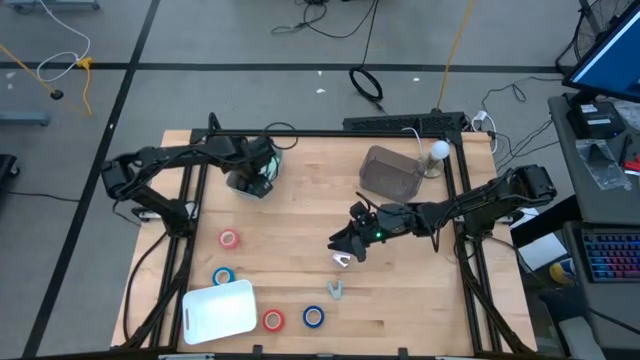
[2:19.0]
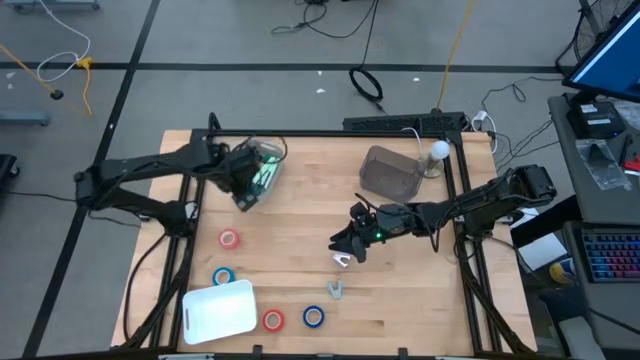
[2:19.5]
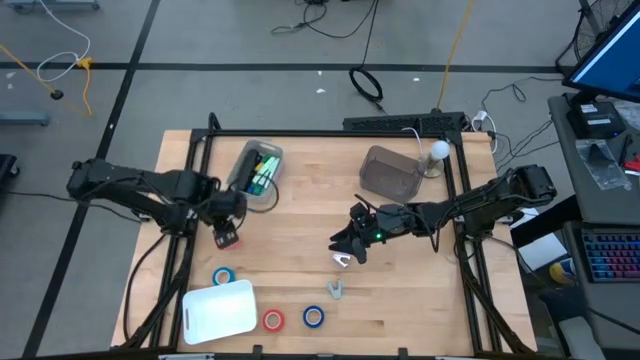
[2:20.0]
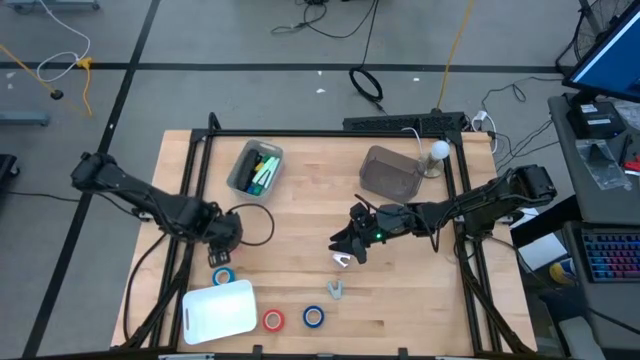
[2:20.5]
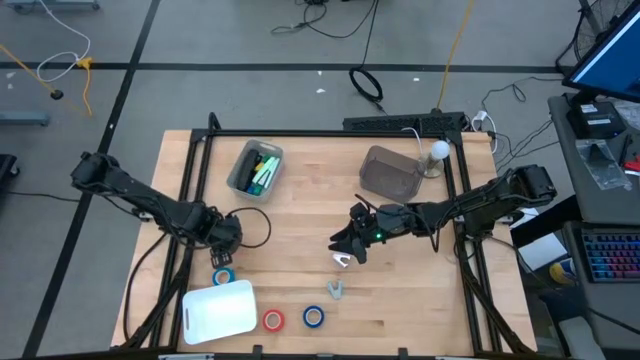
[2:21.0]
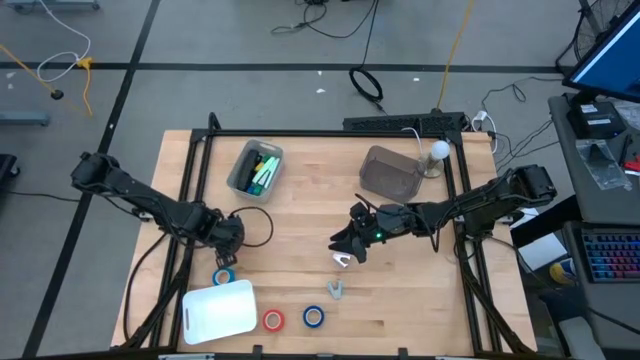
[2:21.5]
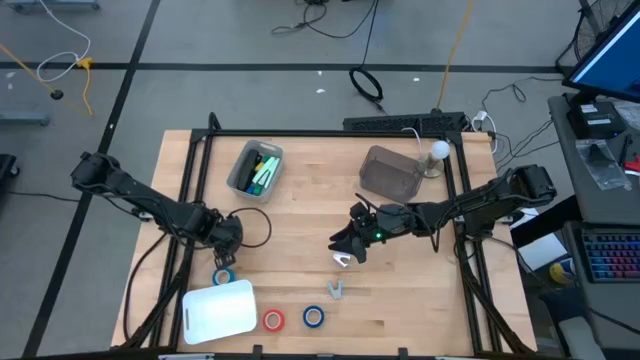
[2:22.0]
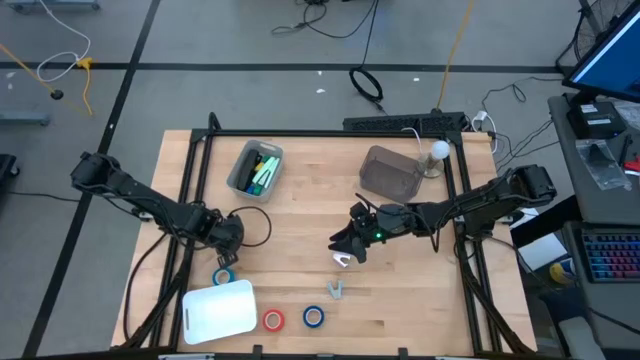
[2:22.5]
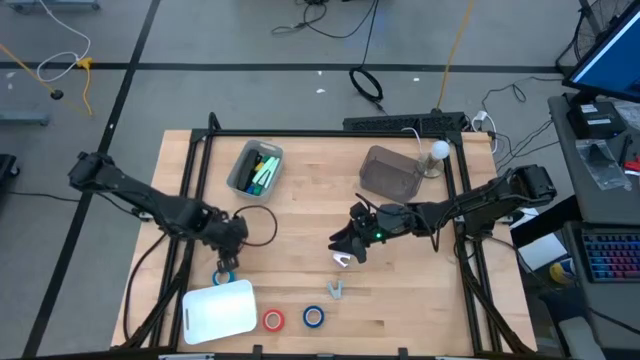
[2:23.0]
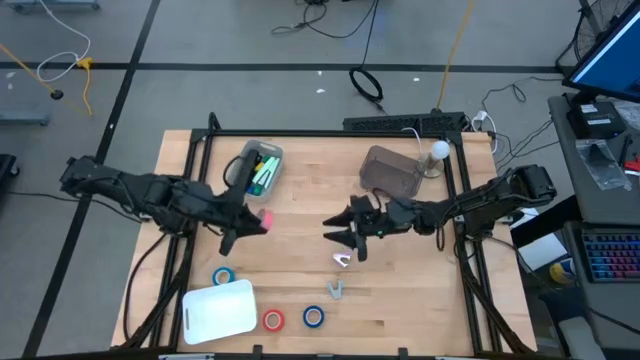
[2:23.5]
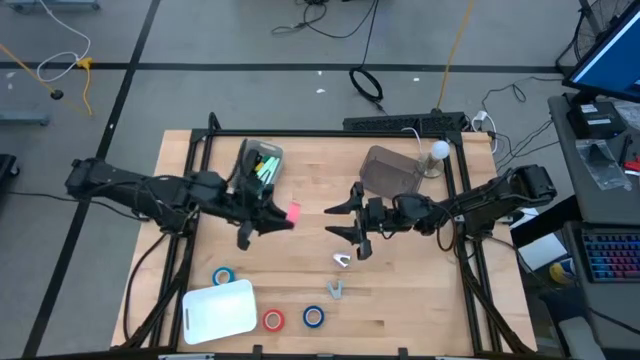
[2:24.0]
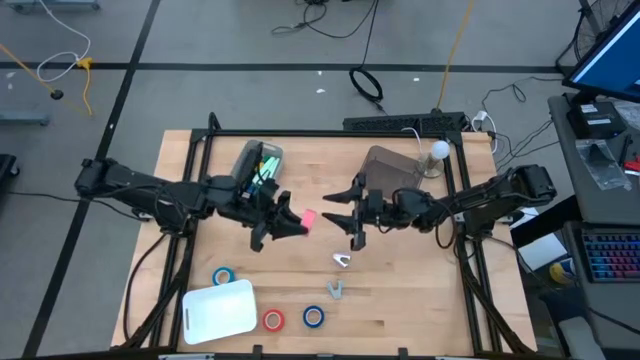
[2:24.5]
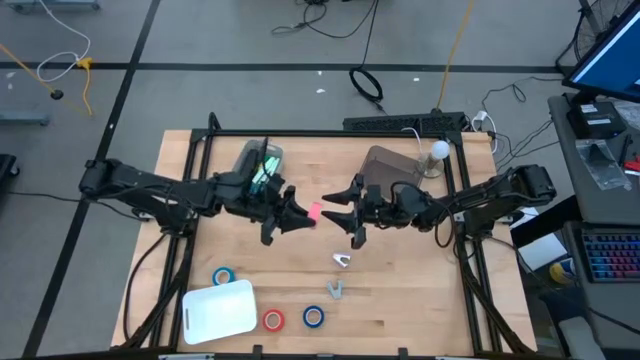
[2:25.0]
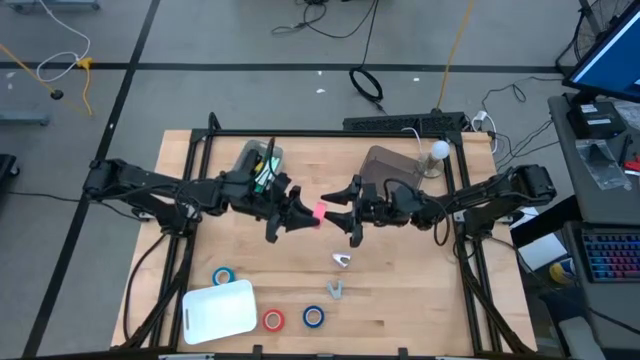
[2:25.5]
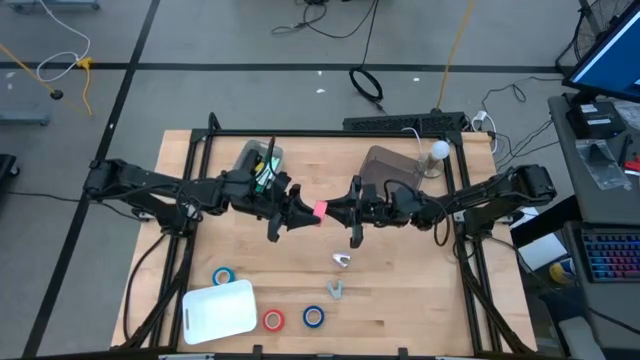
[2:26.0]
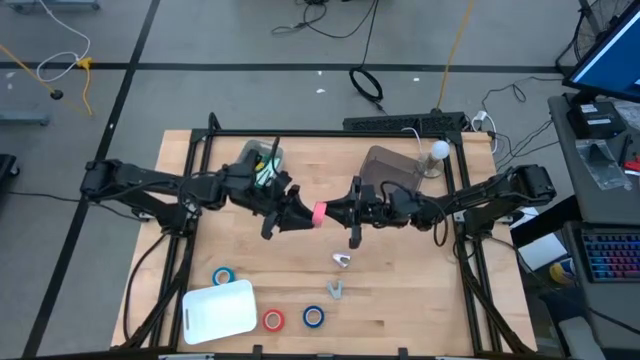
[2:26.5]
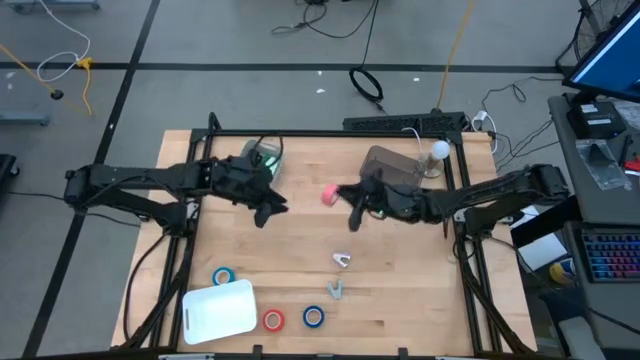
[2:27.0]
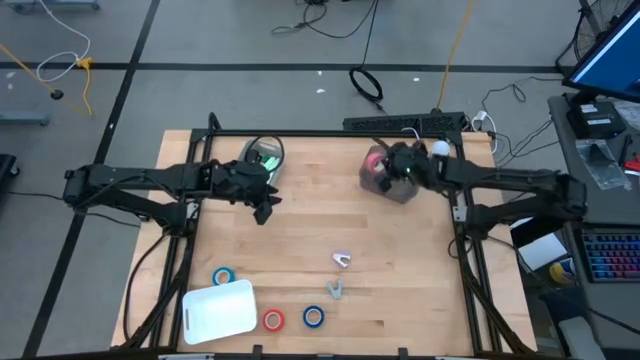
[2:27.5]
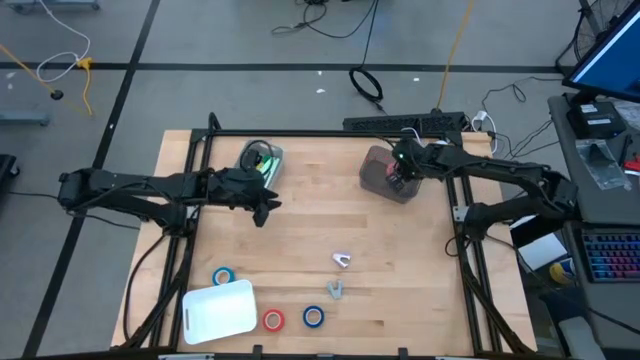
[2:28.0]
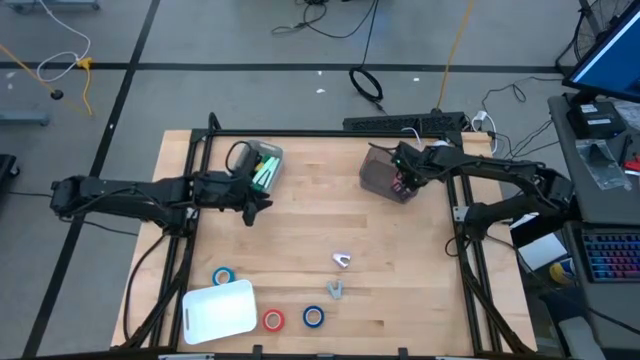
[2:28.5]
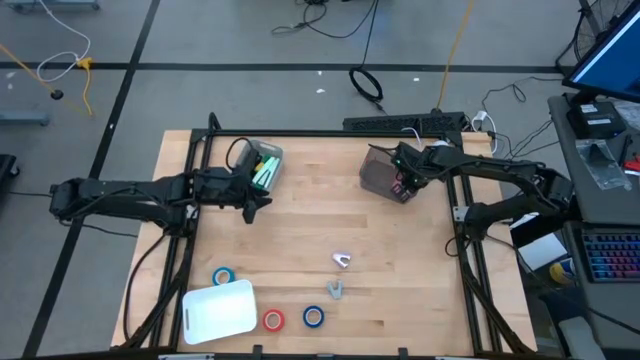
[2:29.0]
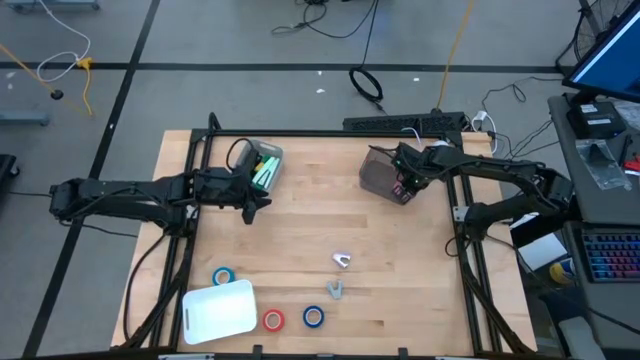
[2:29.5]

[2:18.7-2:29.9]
Task: Pick and place Stapler, Stapler remover, tape
Put the pink tape into the black bin

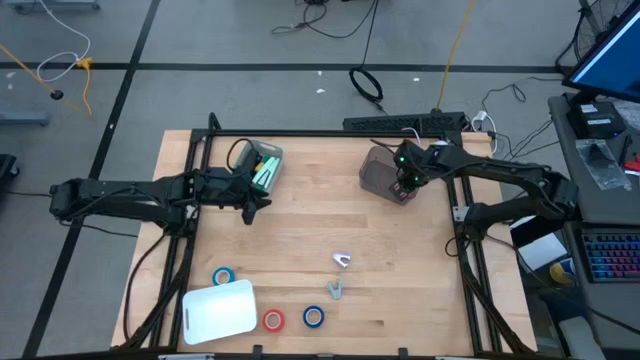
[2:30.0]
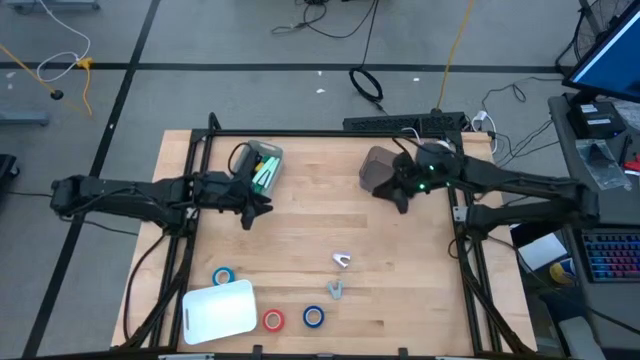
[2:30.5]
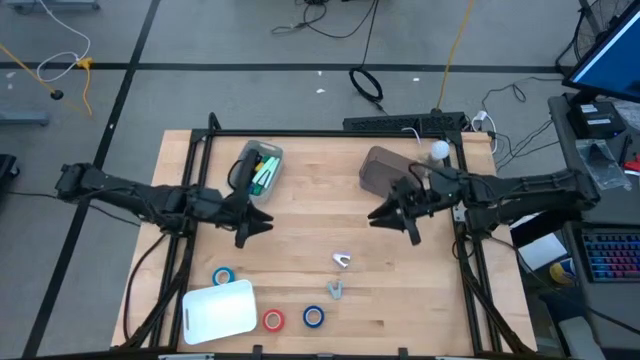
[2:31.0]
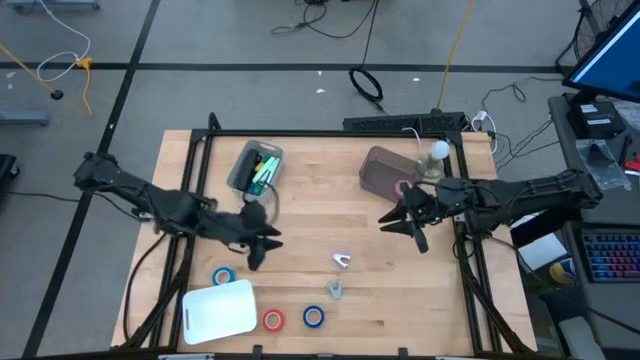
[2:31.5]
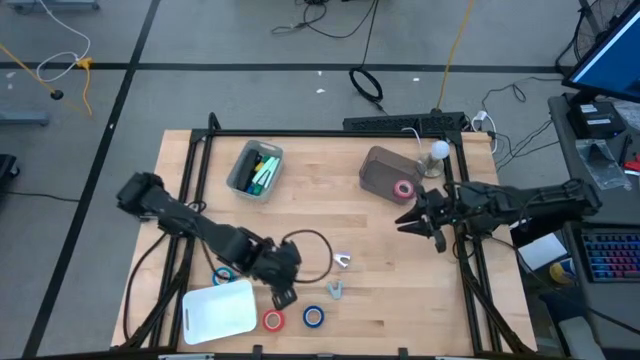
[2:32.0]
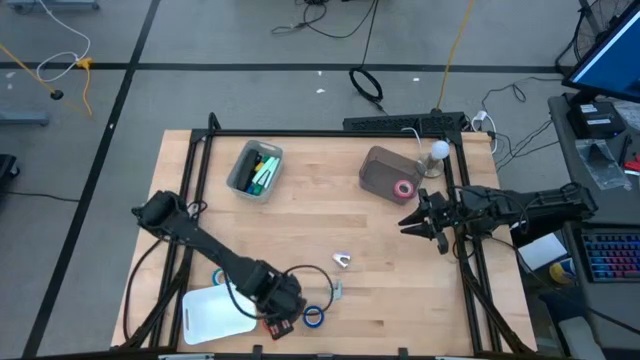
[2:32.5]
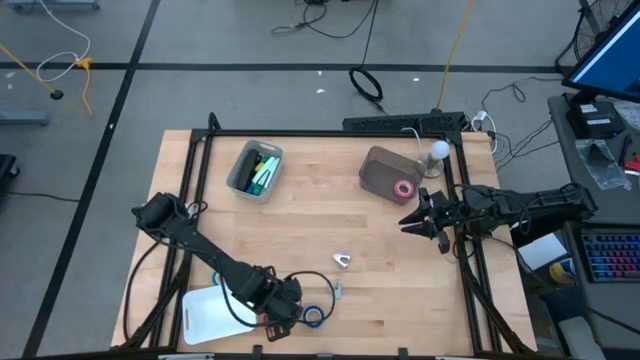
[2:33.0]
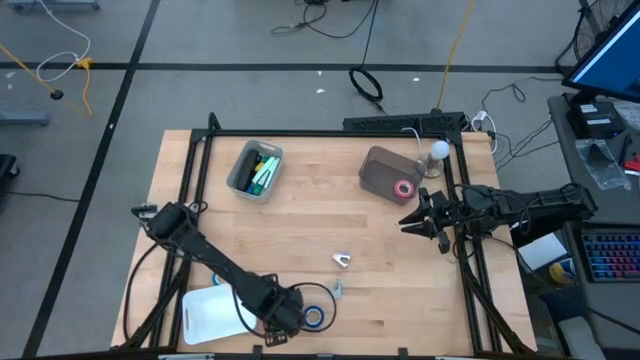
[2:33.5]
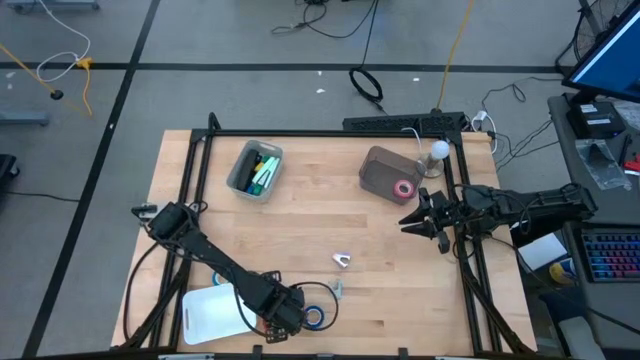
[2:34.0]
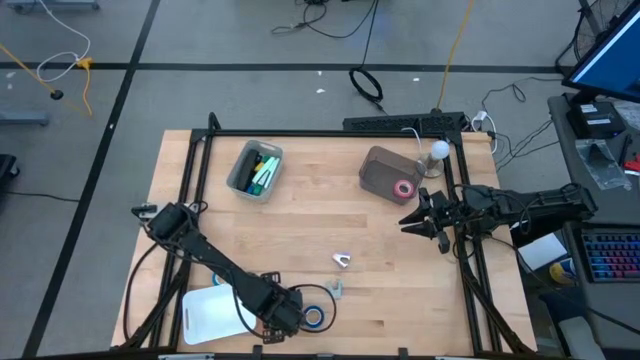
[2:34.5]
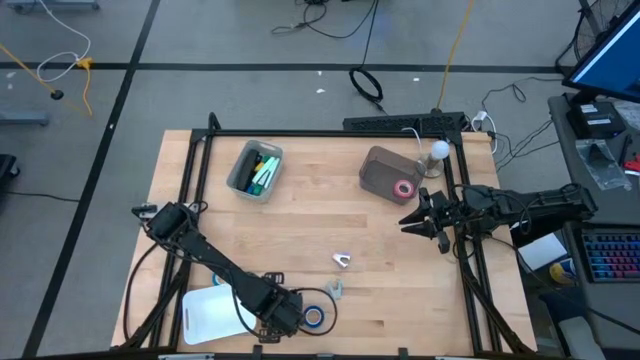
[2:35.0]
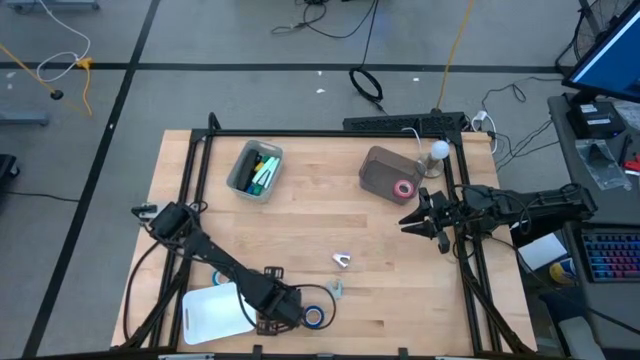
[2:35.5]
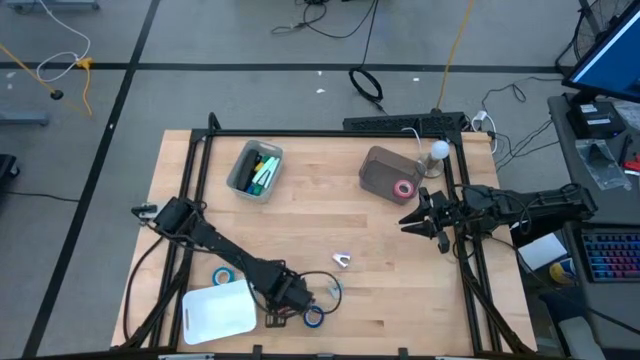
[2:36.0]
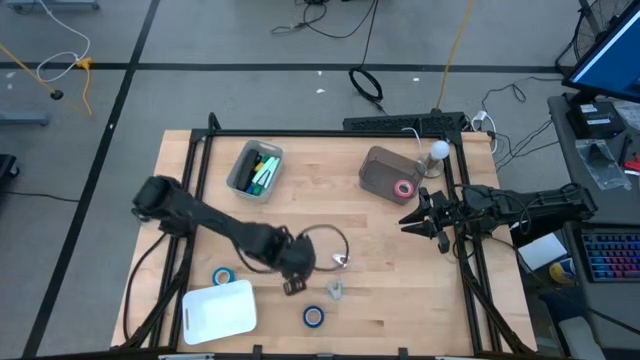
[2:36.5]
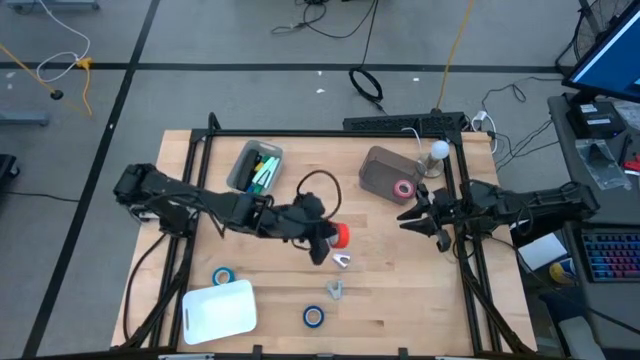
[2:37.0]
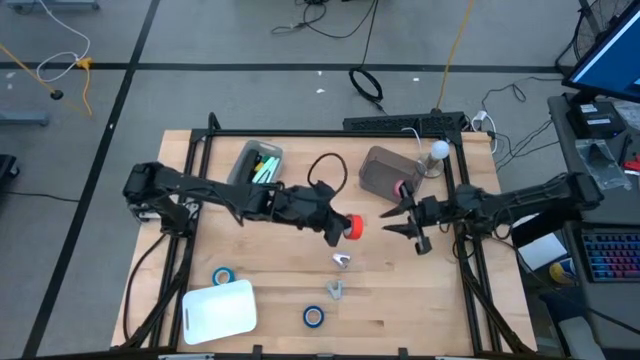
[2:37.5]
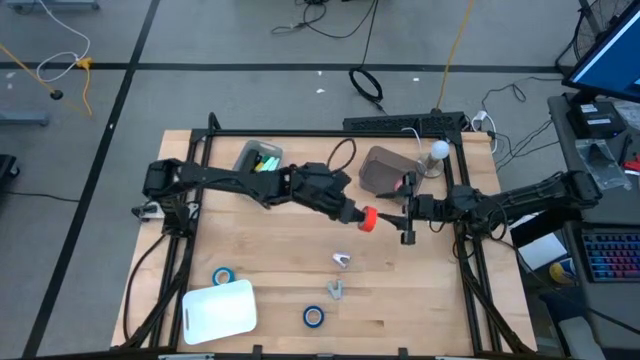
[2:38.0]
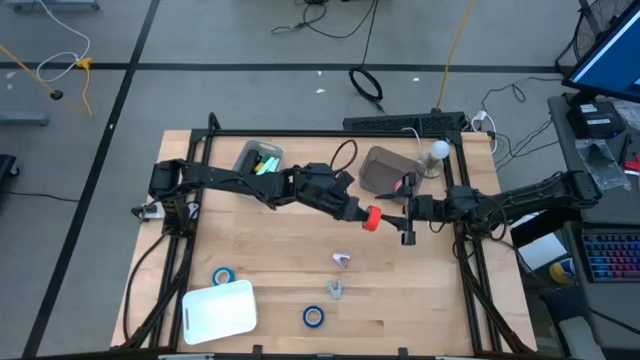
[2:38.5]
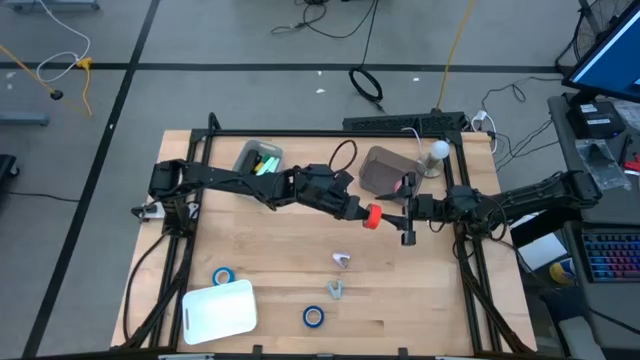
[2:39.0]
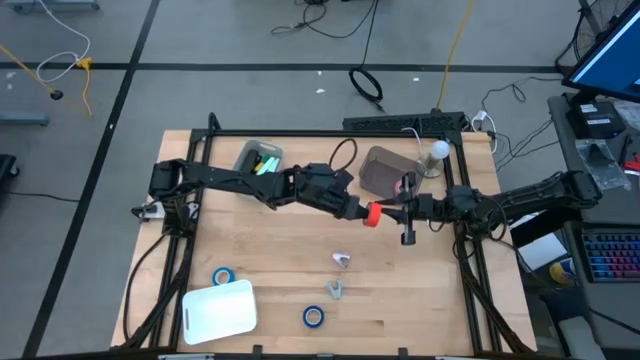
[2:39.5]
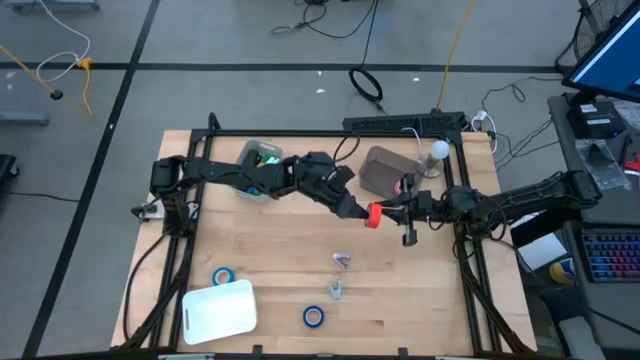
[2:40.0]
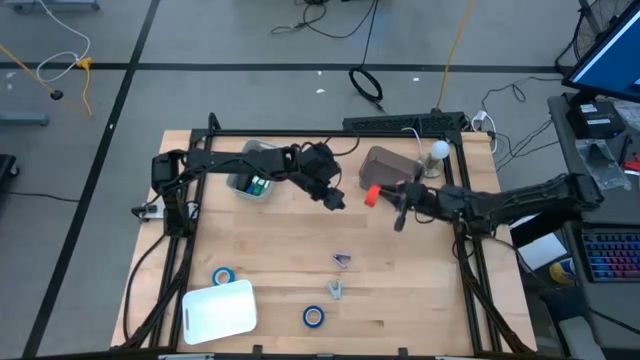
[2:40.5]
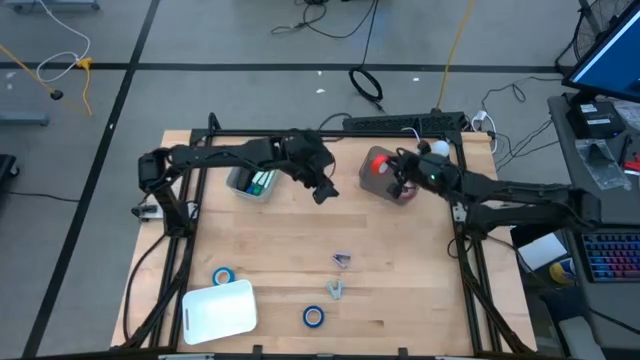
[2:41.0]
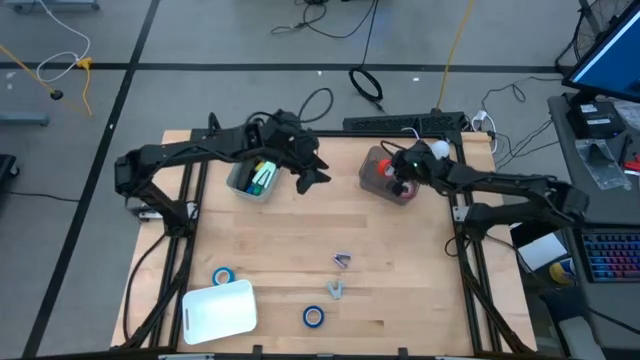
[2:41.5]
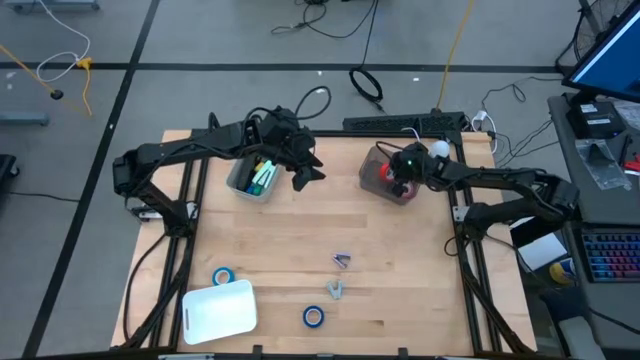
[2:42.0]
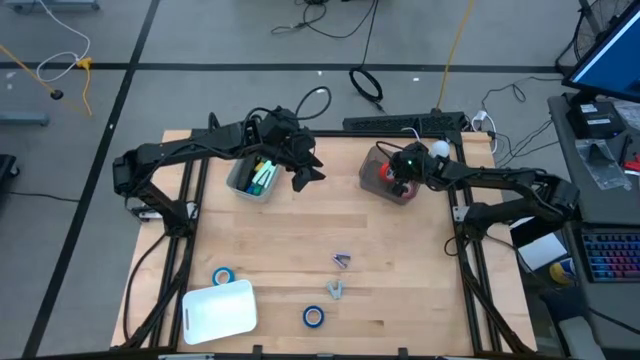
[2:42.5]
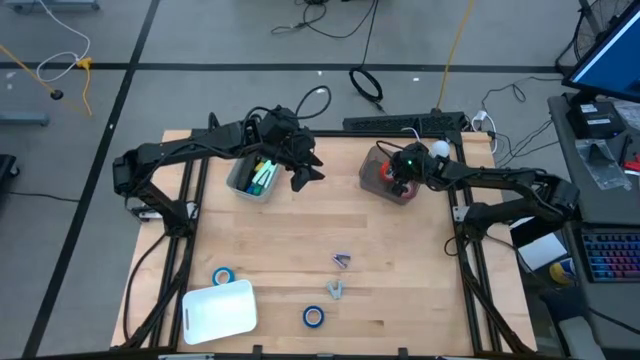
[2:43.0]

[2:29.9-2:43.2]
Put the red tape into the black bin
